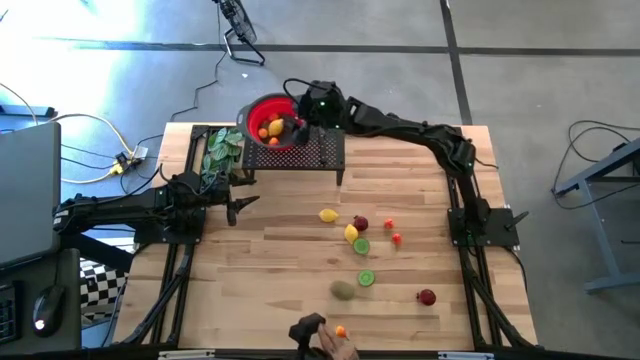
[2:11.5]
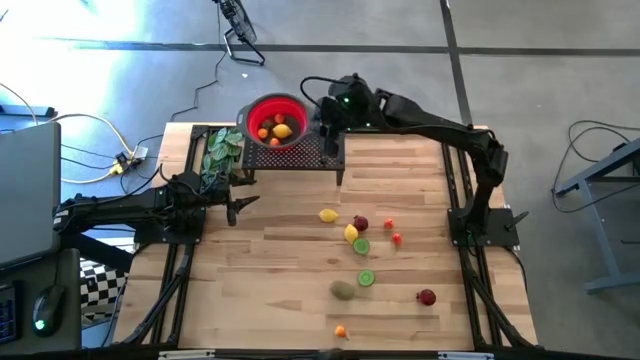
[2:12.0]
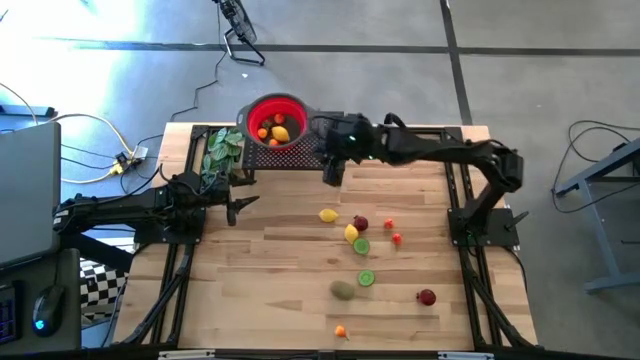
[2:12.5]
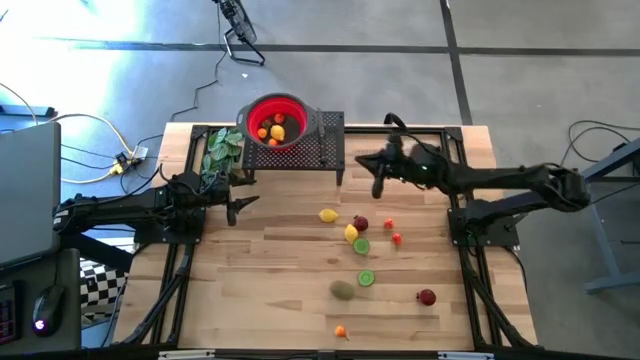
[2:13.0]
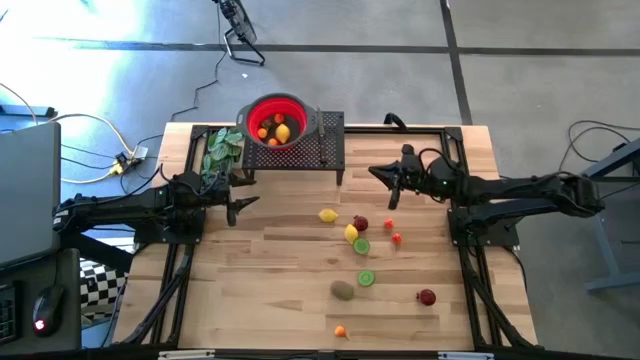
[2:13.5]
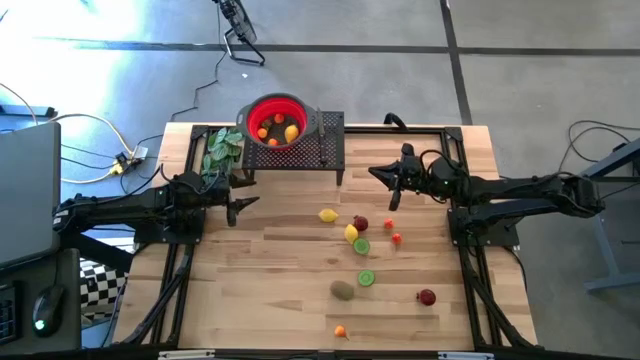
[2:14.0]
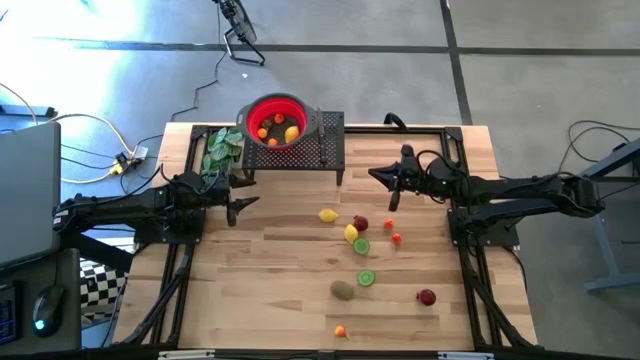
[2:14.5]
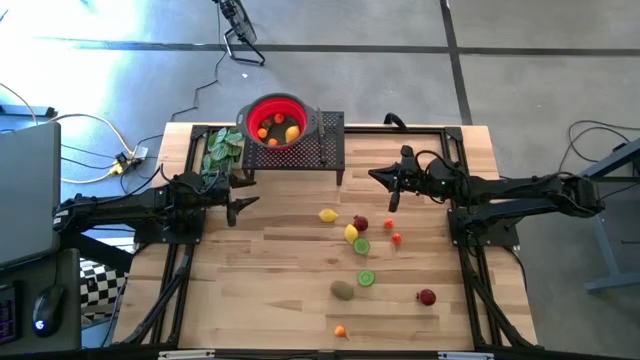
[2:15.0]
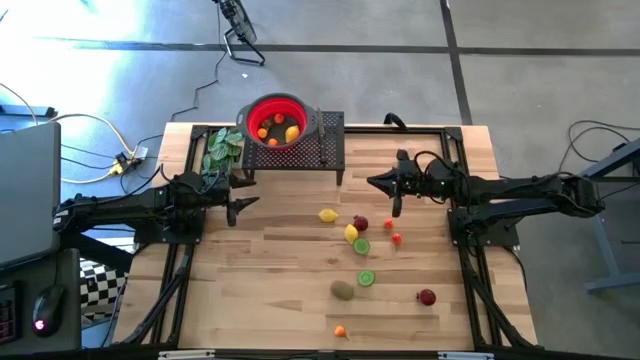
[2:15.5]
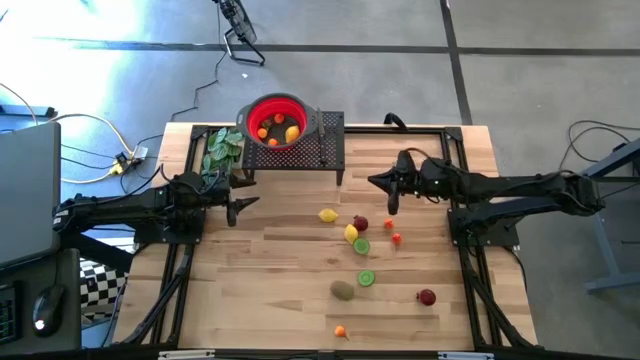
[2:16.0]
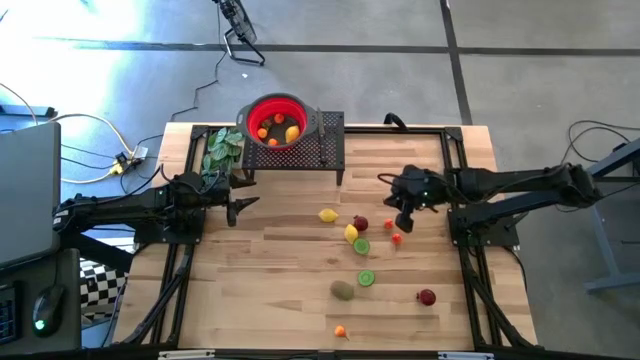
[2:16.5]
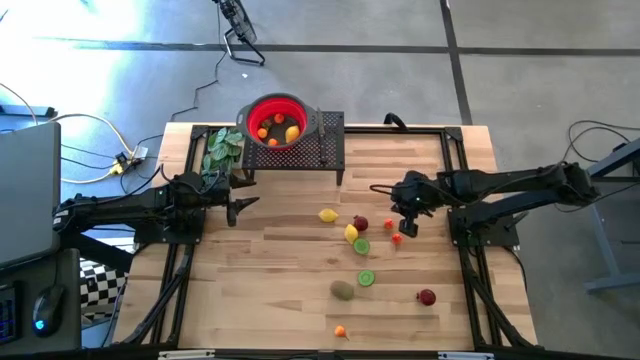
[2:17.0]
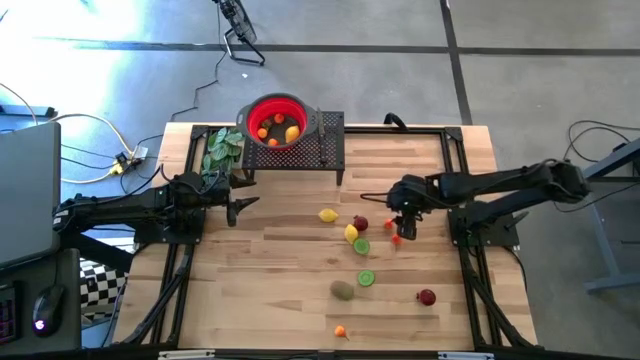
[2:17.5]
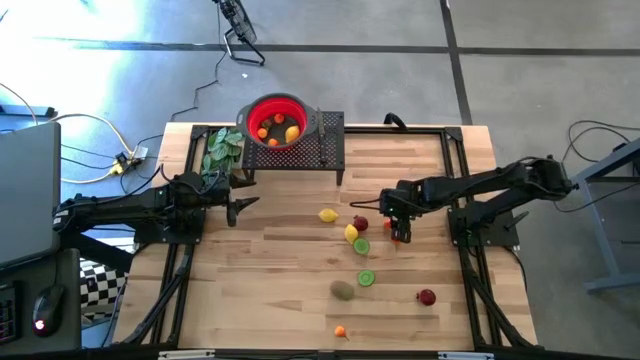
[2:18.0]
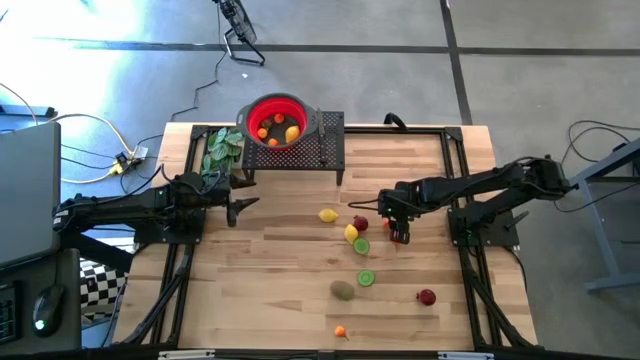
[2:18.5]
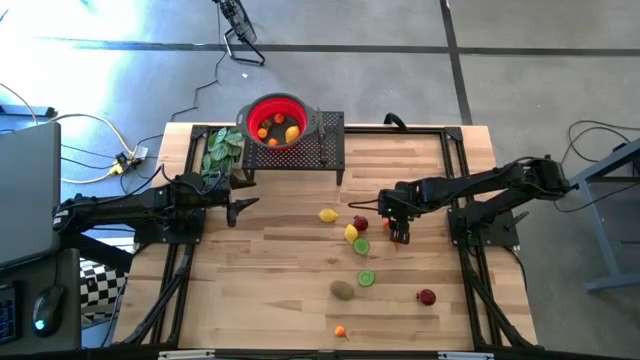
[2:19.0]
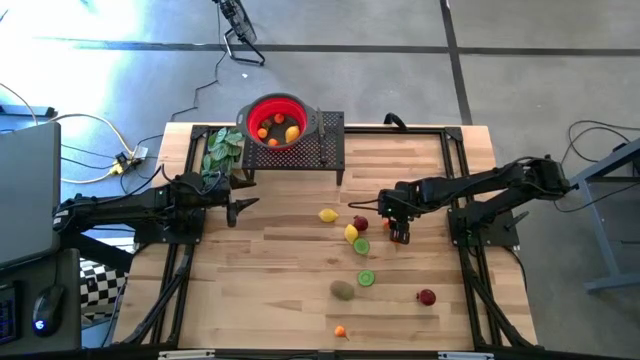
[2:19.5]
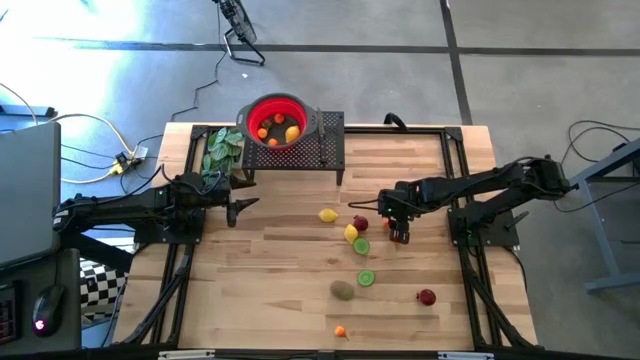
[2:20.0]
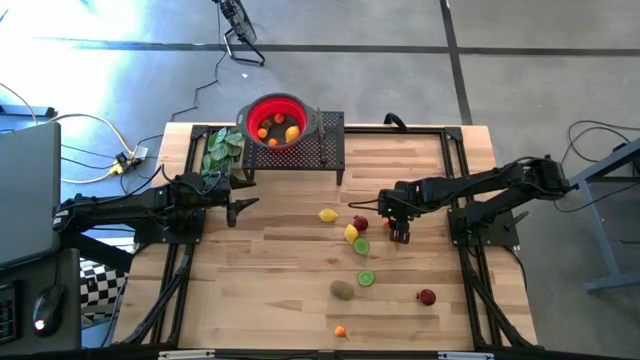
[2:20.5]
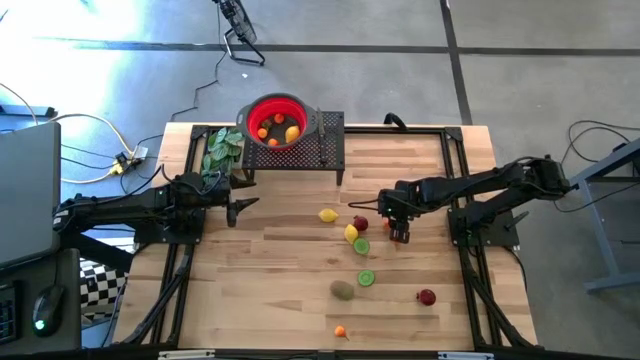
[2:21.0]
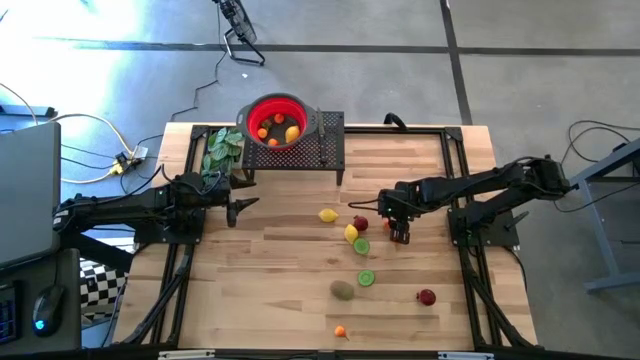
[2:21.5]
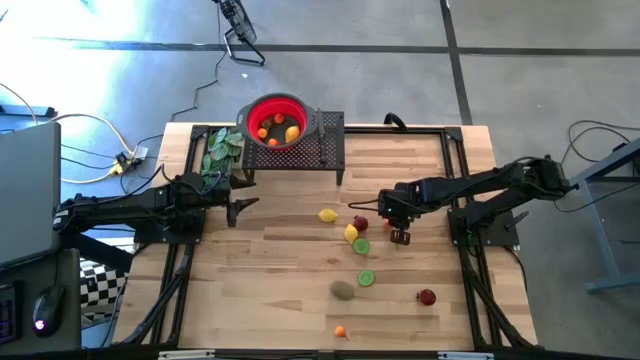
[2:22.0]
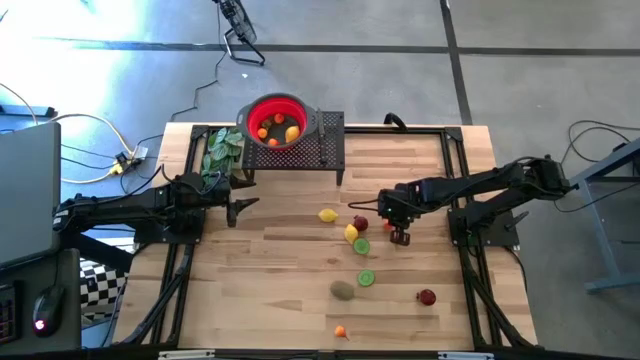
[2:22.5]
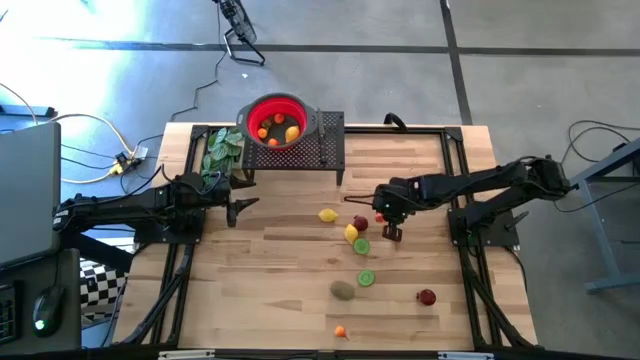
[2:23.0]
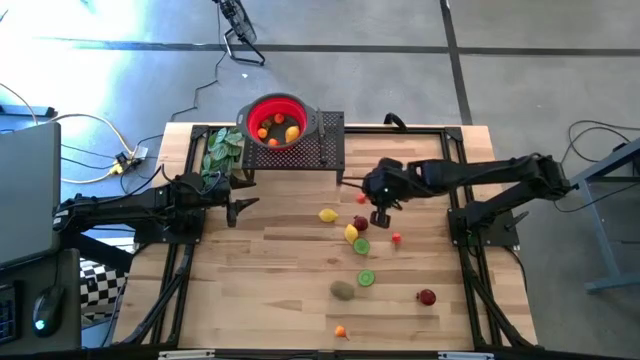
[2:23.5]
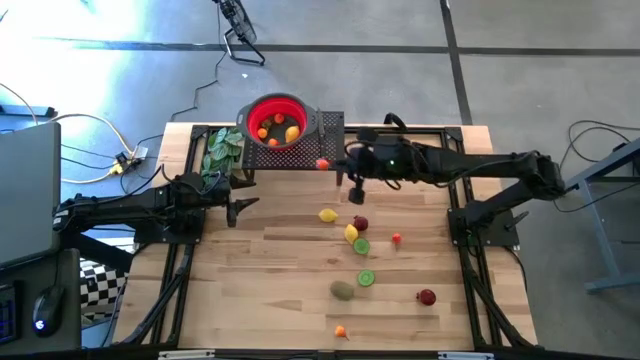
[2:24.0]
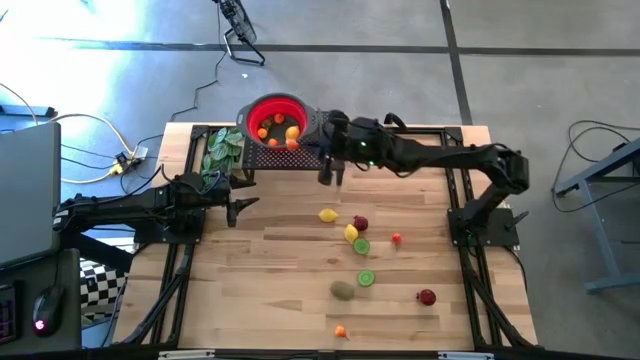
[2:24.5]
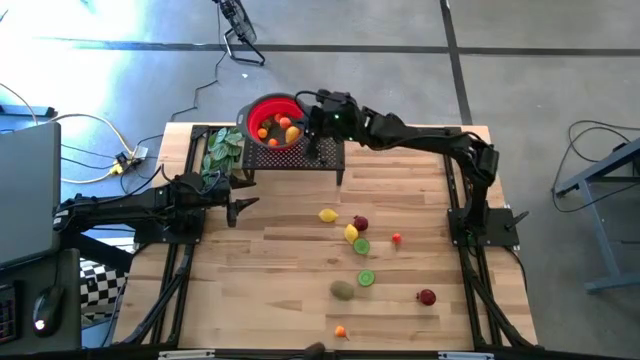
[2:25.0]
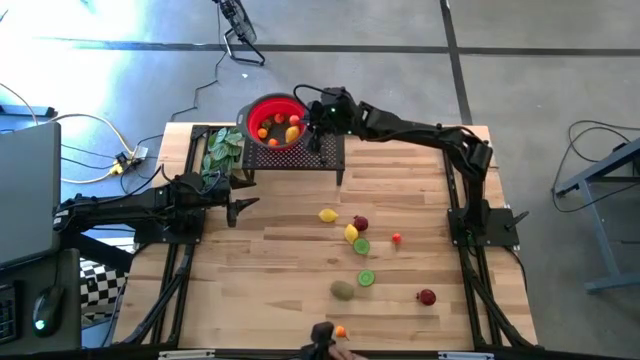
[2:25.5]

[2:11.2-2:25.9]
Task: Pick & Place Fruit
Put the orange pear into the red strainer bowl on the shelf

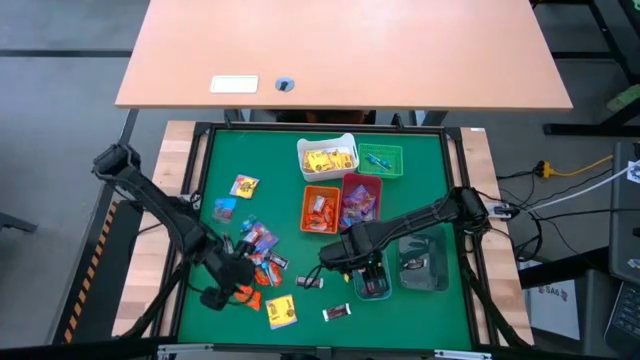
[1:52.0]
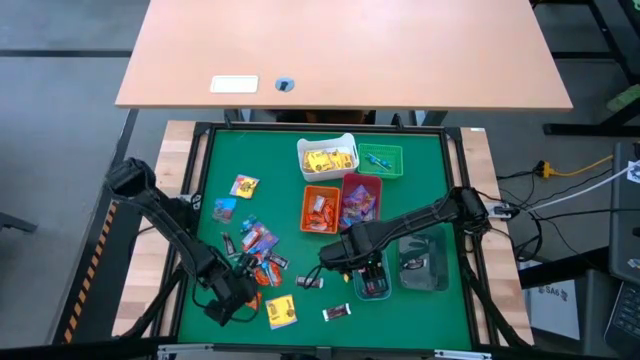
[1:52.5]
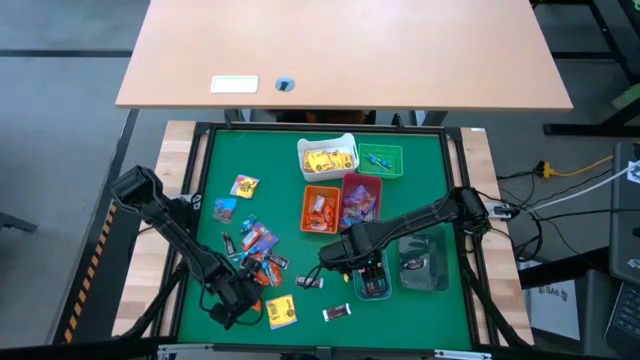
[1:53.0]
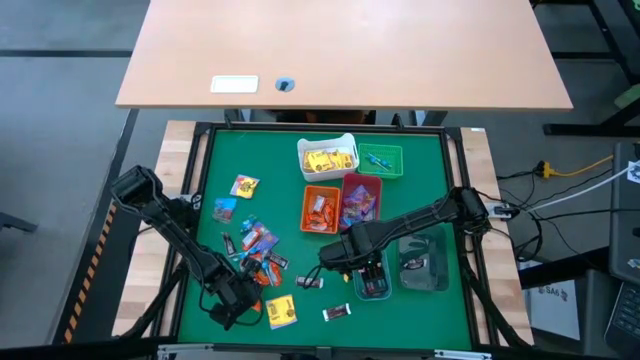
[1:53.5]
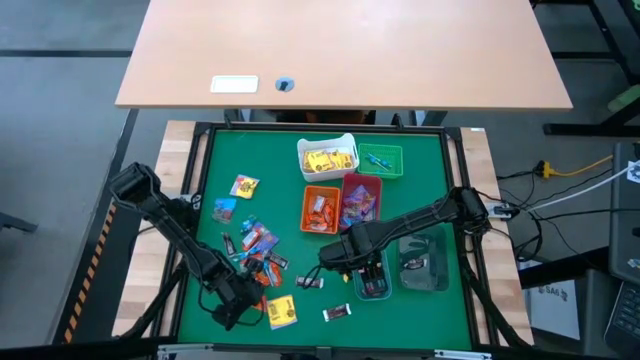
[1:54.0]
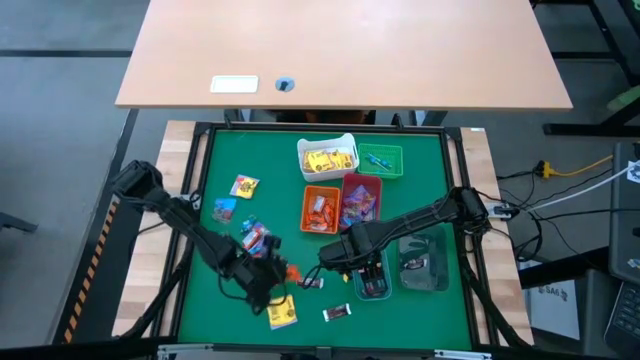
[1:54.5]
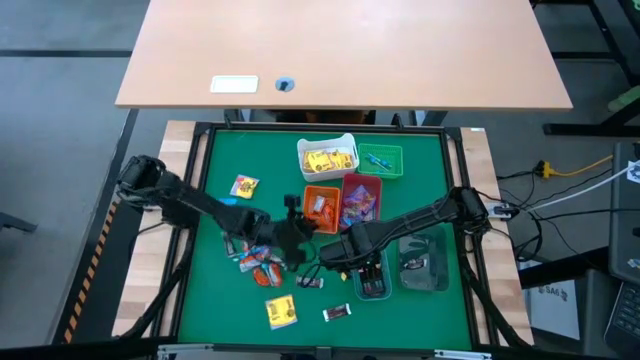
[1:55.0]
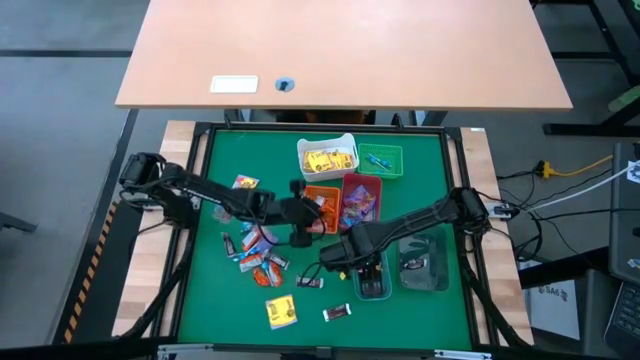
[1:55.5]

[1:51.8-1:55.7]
Task: Sort candy
Put the orange chocolate into the orange basket

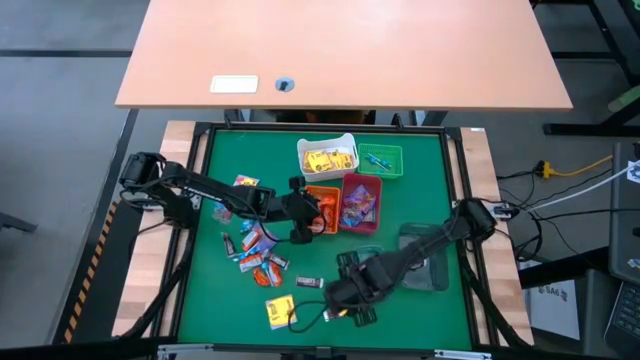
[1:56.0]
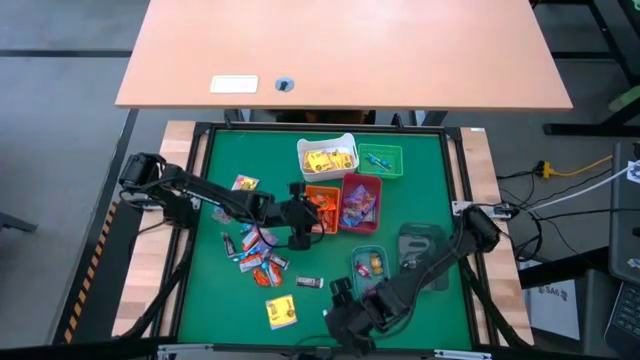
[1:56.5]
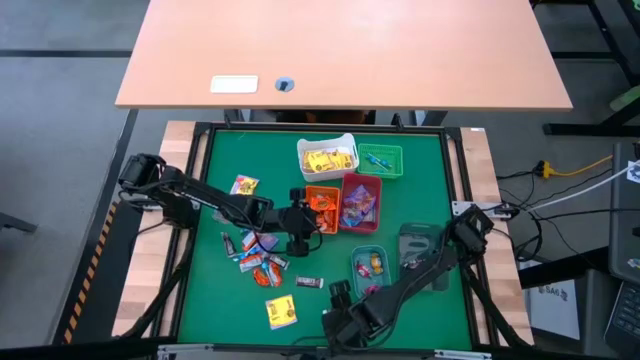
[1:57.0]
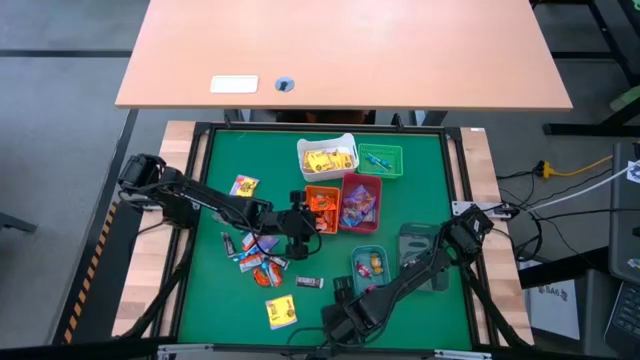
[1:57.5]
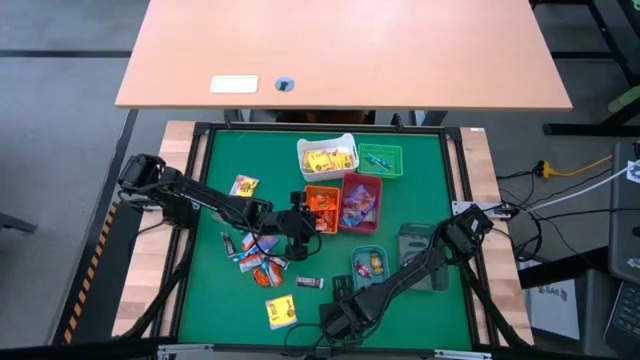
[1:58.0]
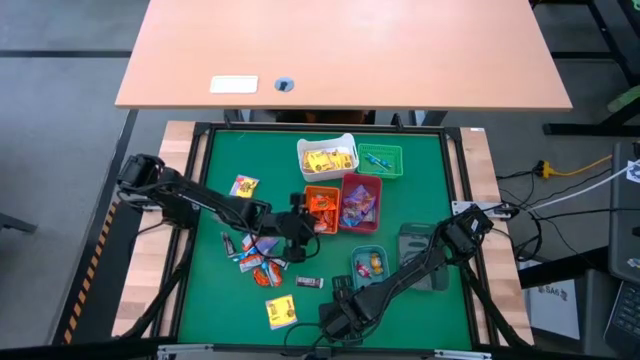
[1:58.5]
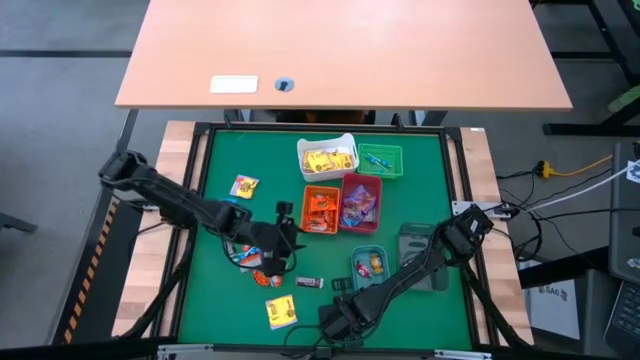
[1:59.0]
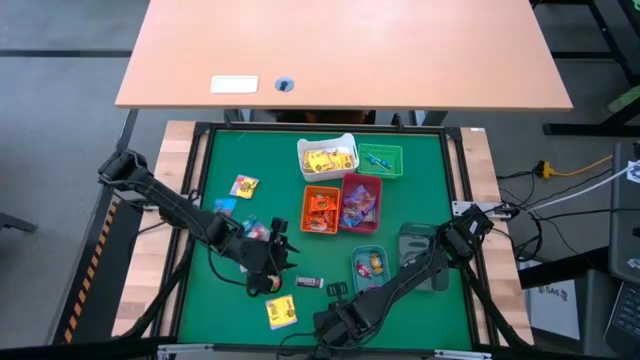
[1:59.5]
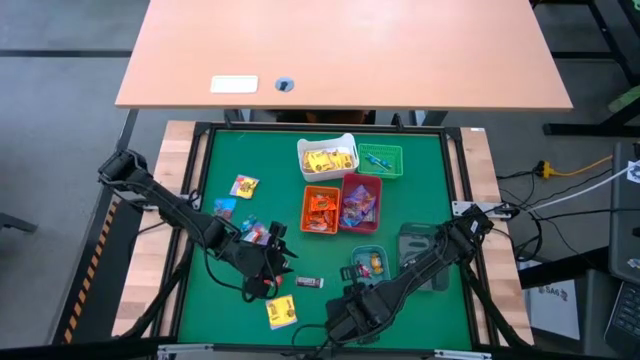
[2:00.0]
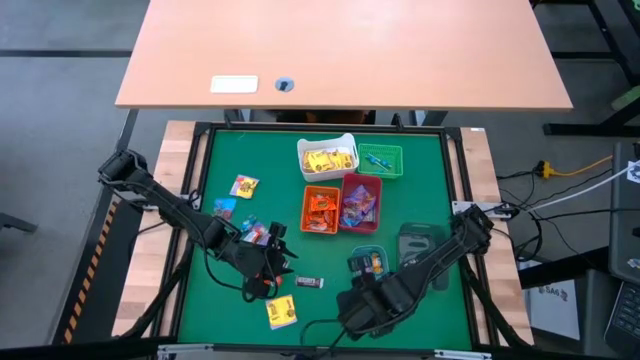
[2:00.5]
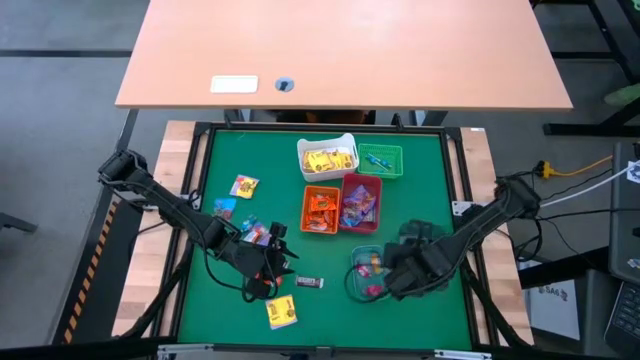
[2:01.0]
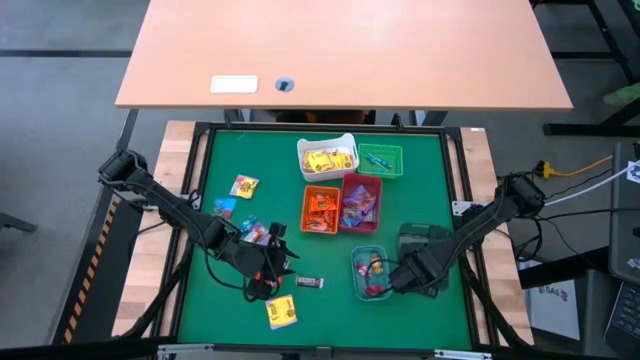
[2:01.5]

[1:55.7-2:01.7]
Put the brown chocolate into the gray bin
